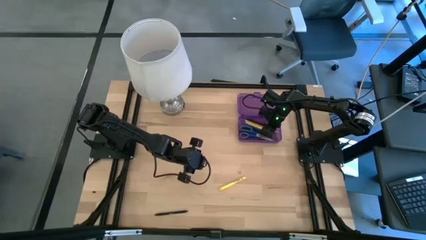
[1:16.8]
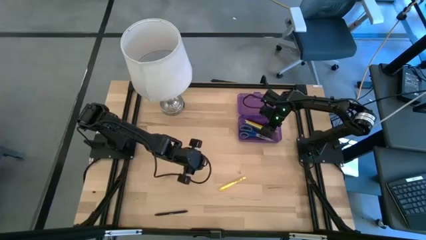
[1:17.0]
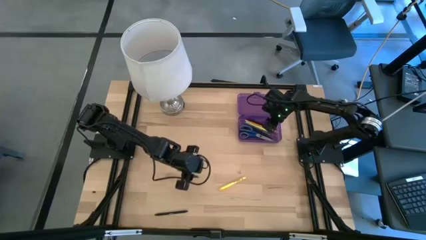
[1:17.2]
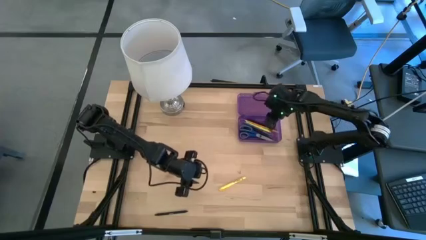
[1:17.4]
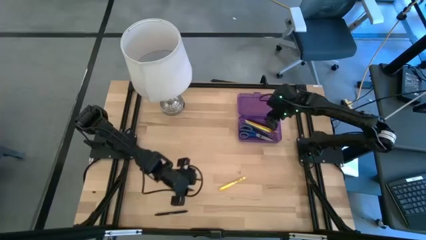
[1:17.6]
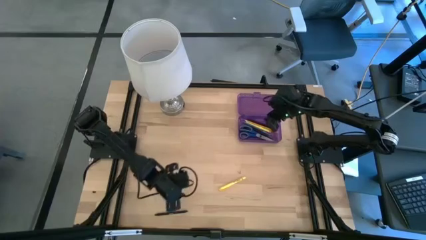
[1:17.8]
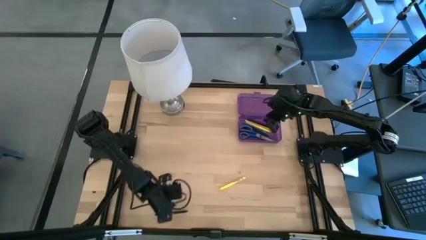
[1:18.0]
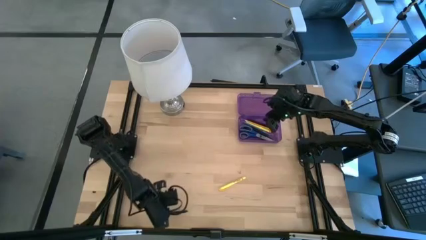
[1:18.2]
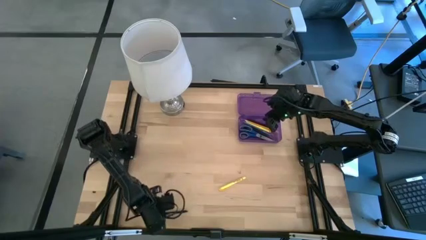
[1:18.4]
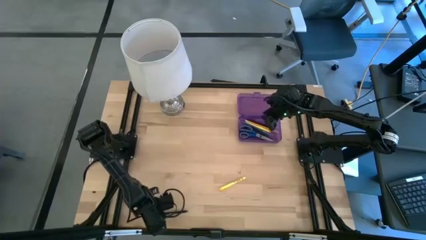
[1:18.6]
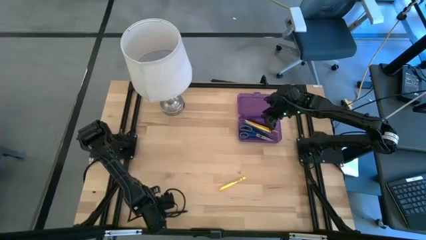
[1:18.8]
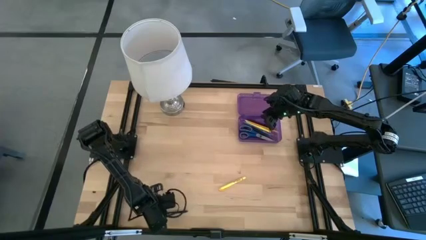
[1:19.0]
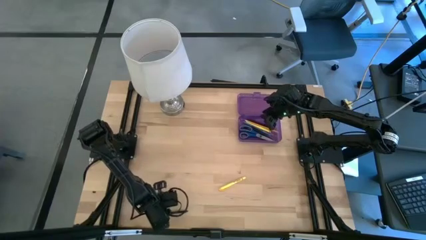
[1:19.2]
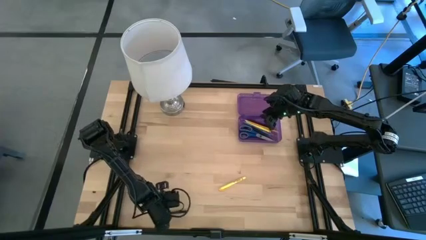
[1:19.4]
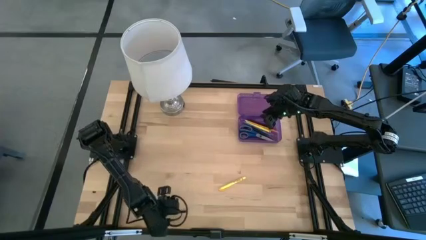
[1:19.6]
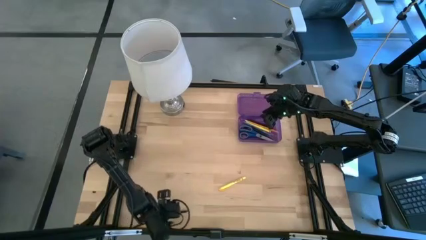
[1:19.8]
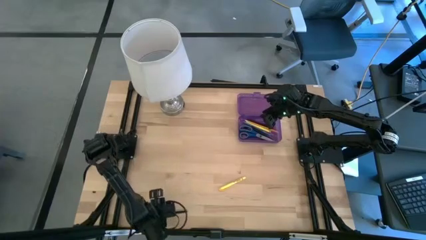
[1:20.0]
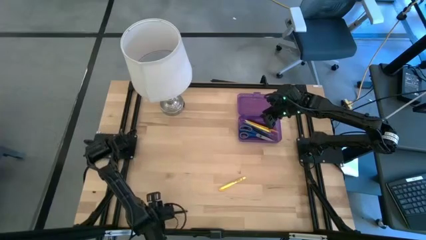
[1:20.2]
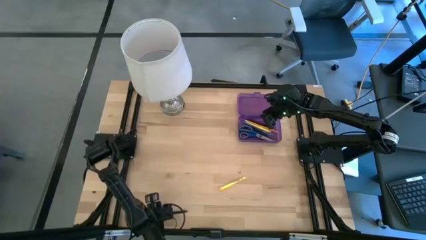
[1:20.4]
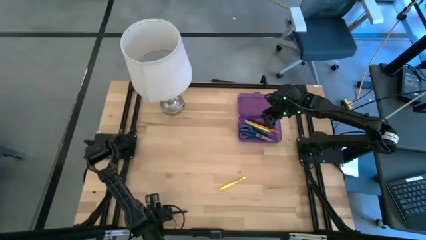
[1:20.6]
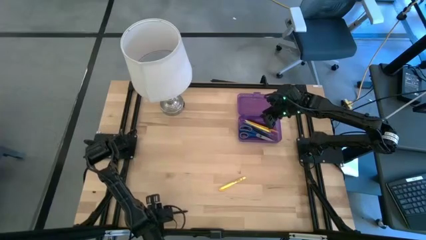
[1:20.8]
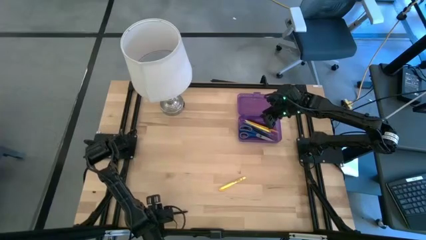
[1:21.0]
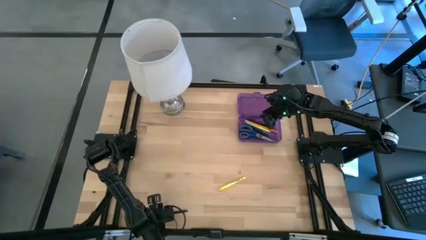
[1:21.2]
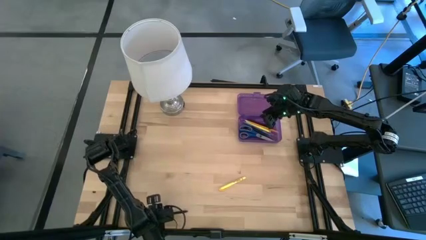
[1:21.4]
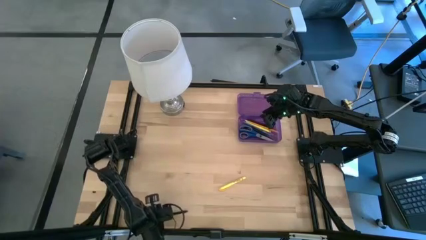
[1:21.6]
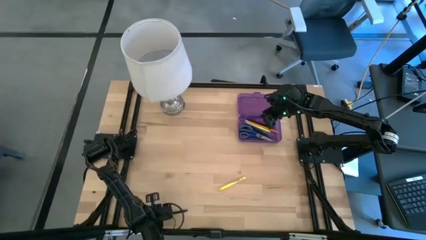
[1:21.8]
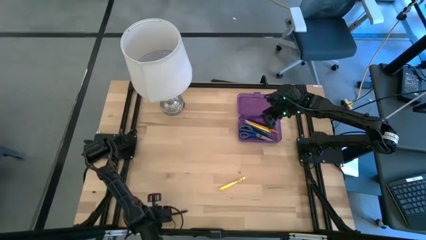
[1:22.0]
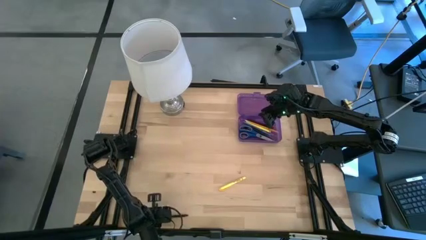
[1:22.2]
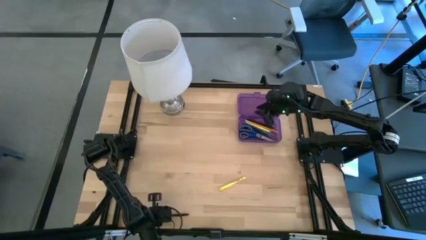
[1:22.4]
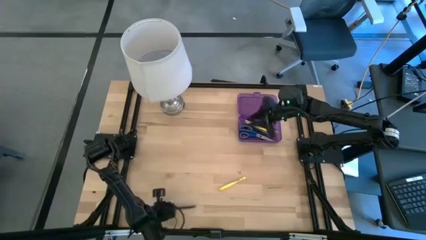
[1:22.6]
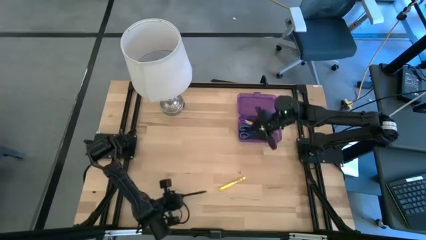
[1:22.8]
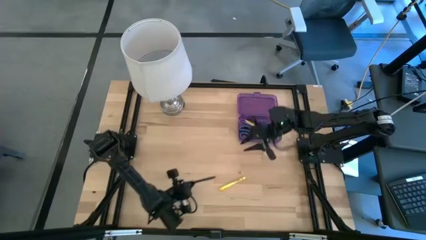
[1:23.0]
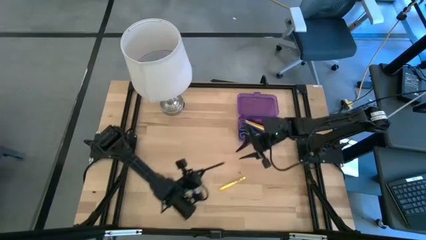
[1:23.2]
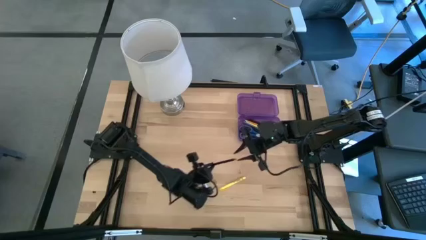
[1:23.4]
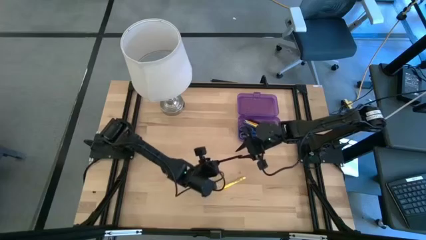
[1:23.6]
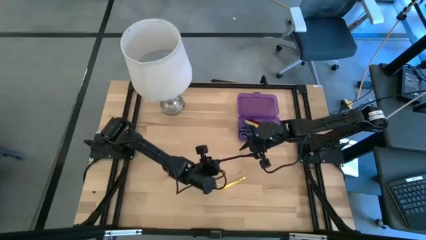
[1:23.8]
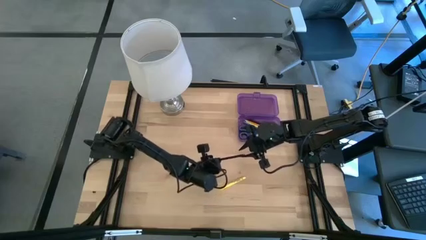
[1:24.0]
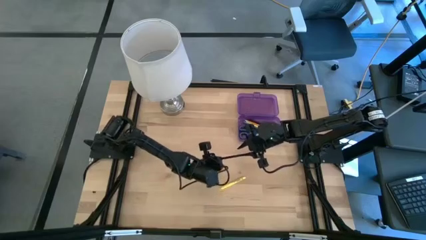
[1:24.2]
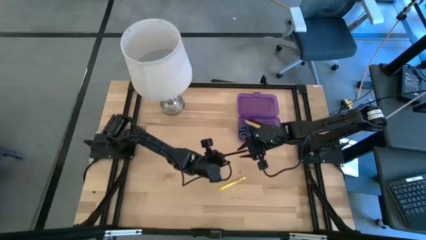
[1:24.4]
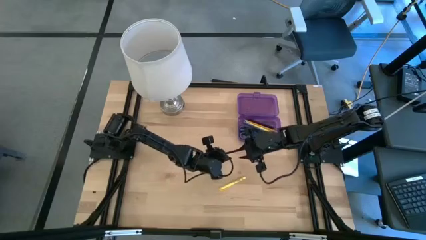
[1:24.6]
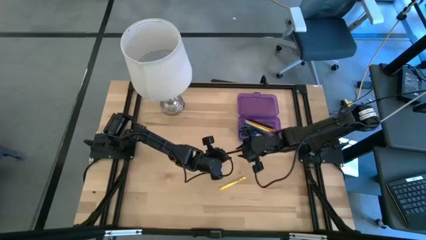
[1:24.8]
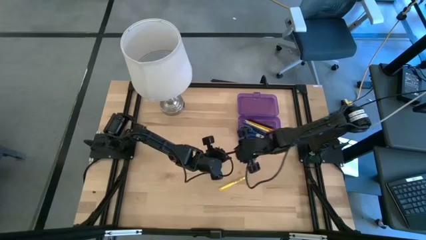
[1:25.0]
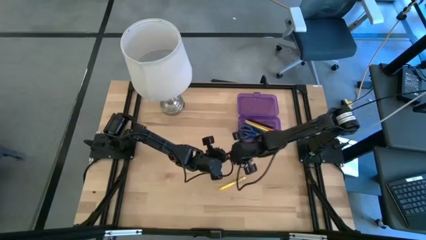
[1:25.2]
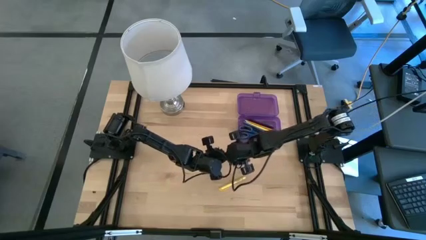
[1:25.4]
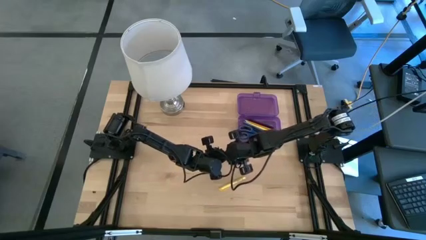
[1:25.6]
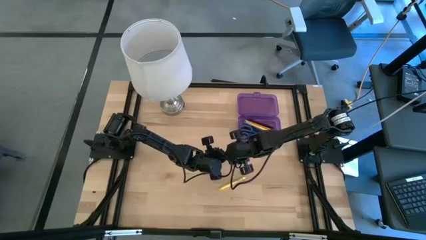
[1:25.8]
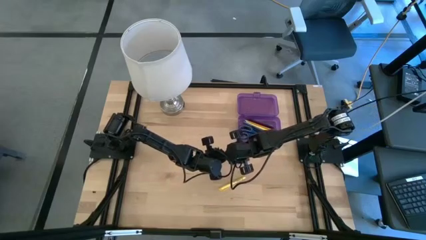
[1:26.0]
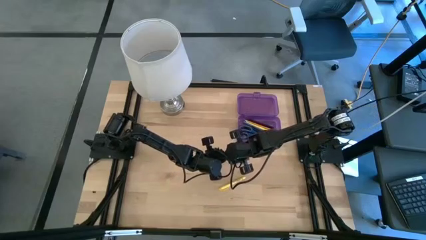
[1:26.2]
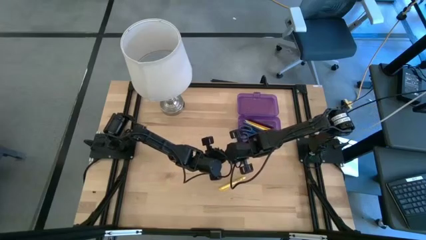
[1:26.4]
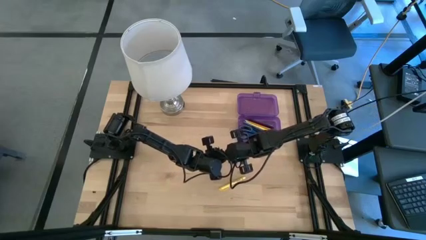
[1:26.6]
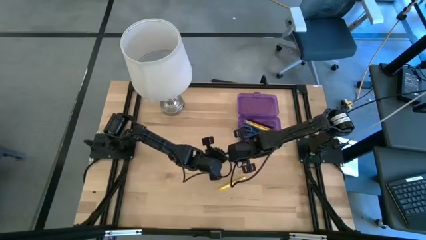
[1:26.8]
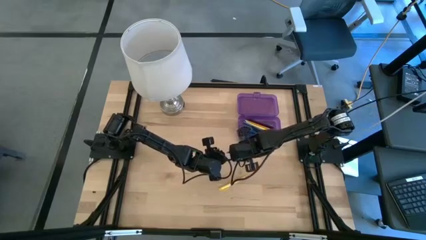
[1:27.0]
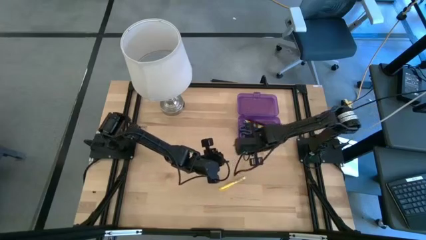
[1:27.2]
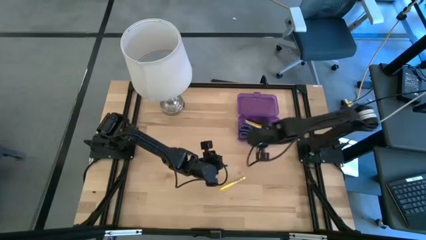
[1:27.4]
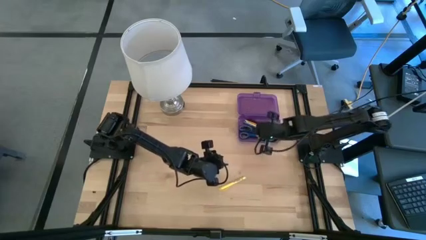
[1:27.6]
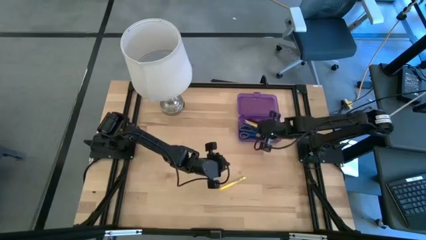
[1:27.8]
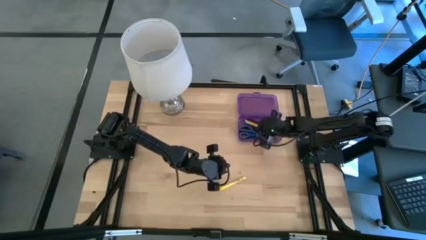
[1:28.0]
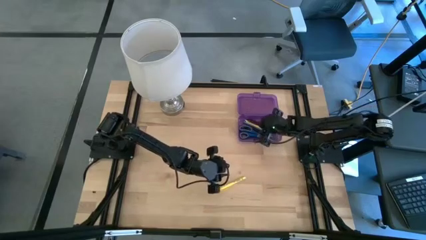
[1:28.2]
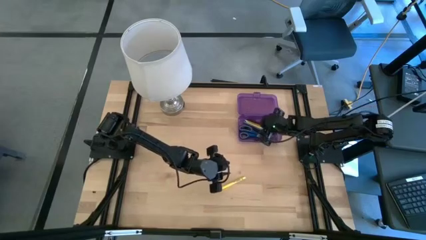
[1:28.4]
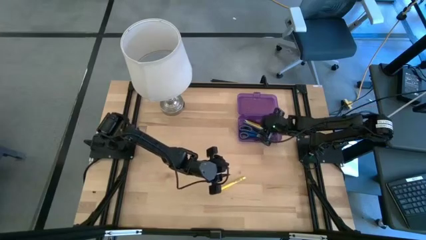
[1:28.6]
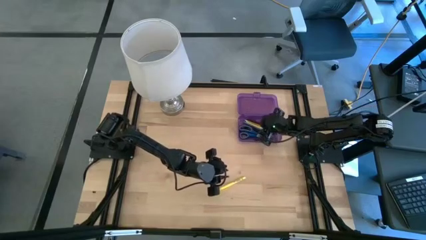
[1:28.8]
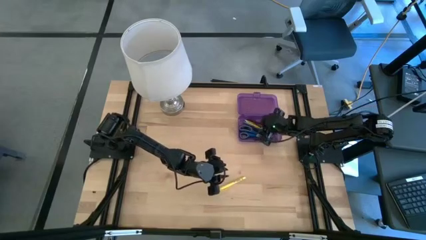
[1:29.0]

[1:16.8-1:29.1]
Task: Pick & place school supplies into a supply box
Put the black pen into the purple supply box

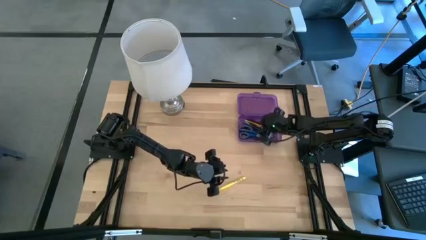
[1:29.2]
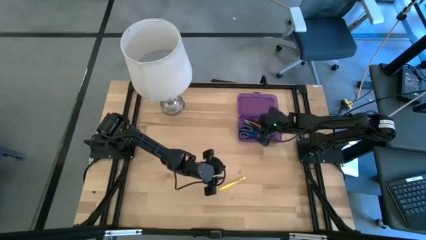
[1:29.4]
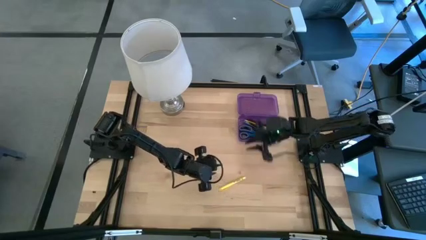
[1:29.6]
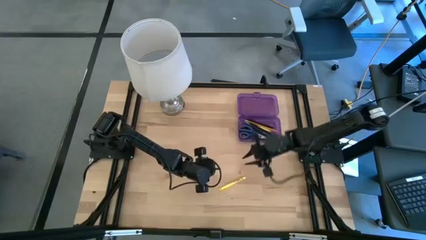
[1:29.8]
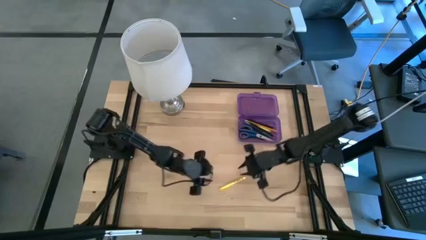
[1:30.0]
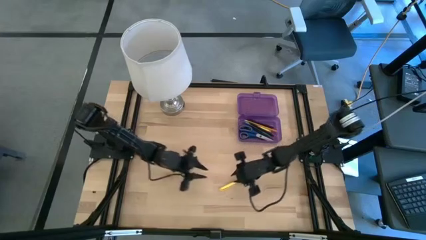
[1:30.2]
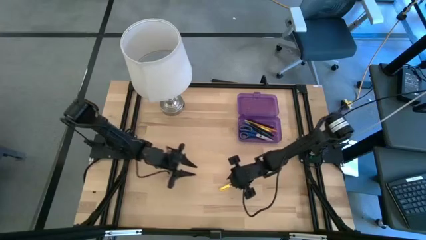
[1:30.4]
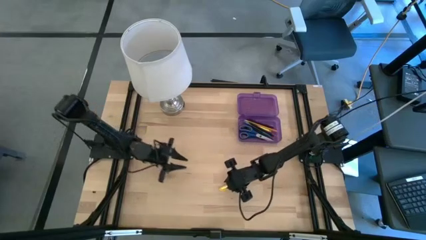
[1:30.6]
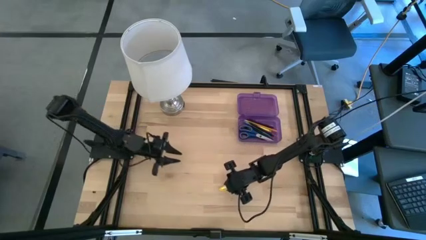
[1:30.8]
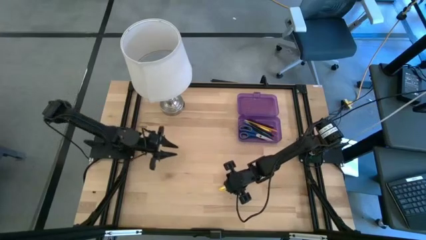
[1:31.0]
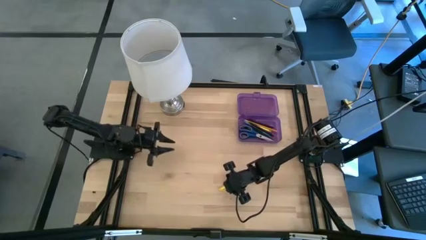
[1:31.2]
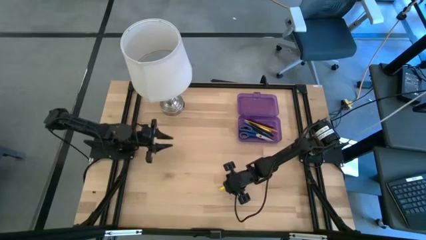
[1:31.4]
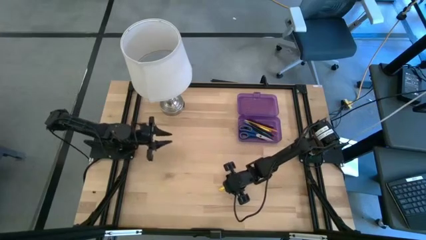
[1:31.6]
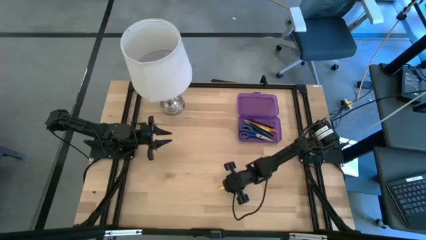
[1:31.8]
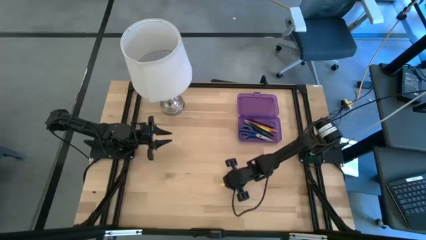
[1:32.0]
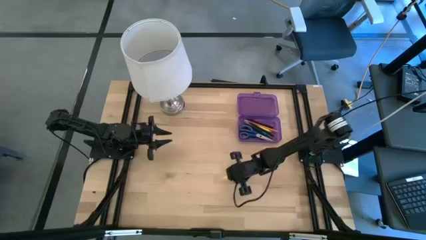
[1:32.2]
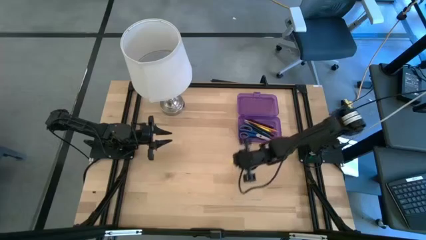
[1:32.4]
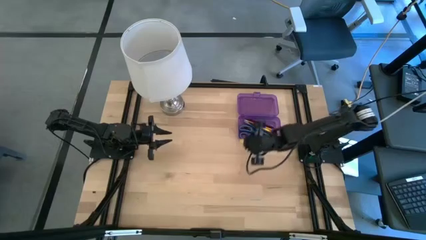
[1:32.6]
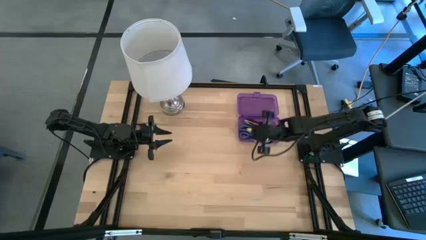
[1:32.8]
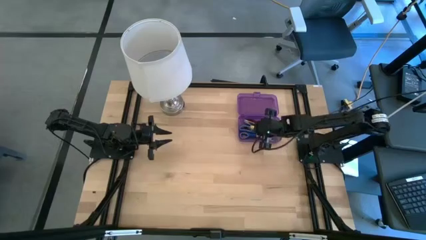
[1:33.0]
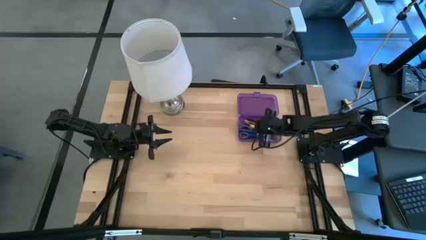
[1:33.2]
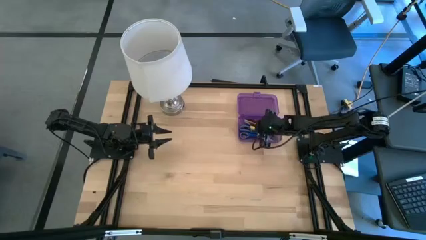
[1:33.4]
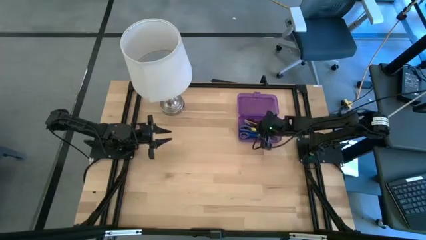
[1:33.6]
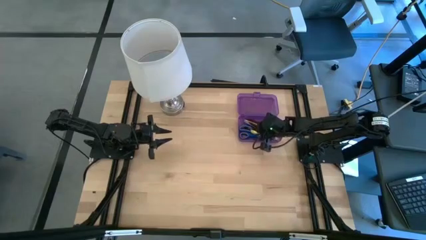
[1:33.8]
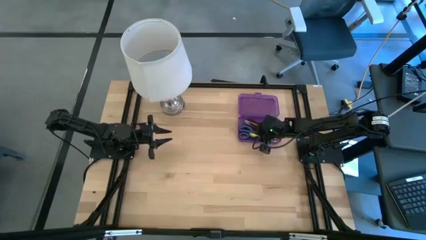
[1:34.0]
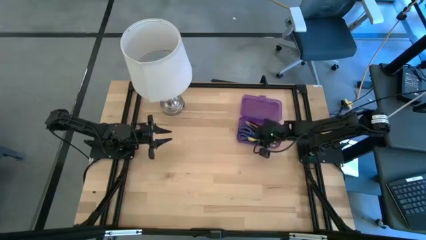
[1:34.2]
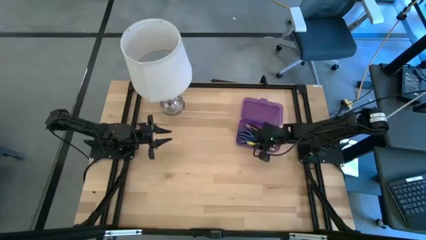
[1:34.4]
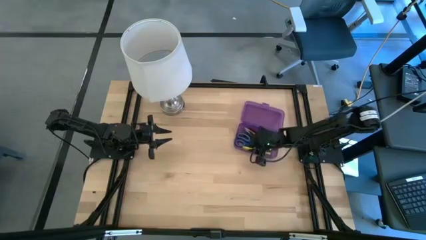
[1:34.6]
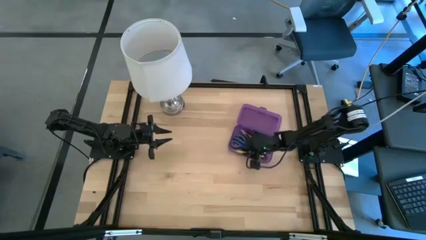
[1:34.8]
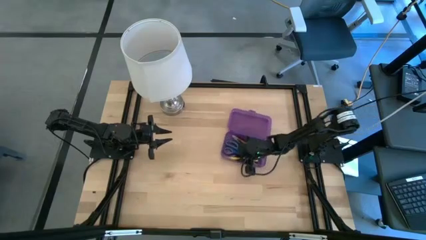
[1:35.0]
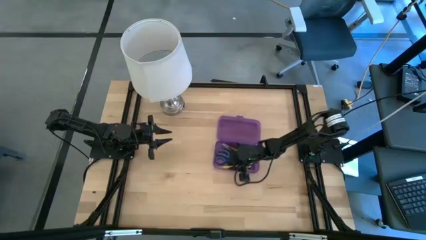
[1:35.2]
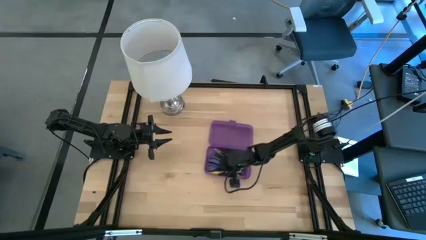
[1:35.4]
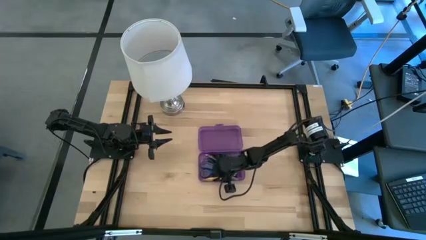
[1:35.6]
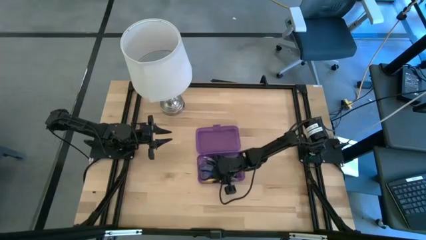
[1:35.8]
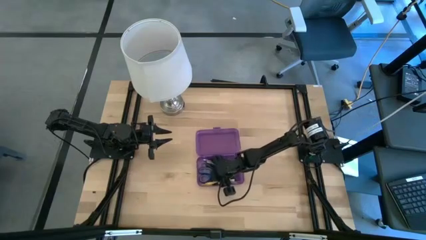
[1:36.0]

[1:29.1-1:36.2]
Put the yellow pen into the purple supply box
